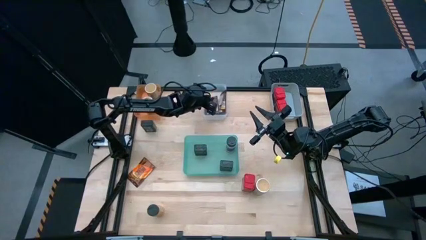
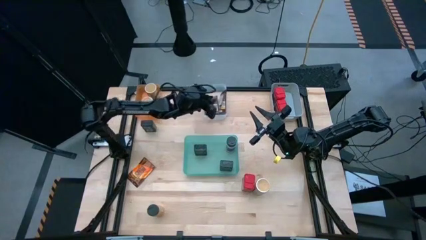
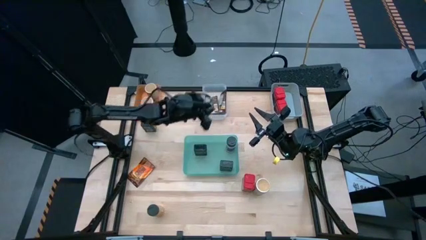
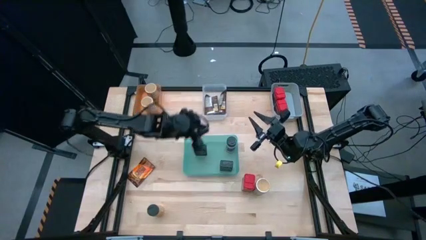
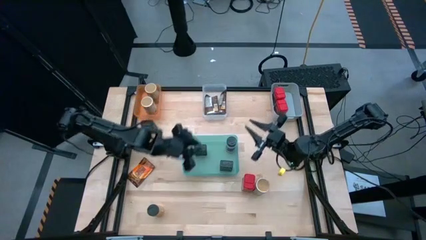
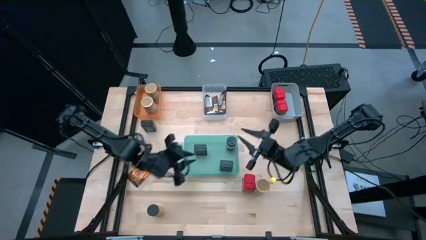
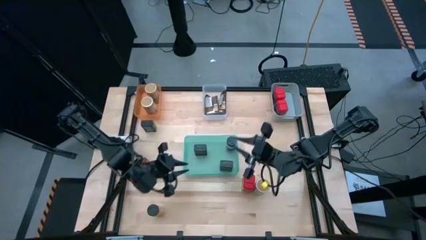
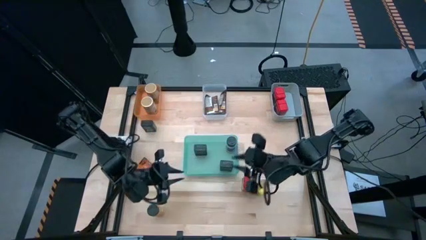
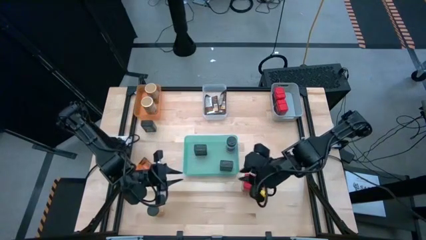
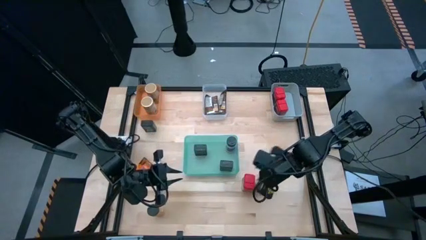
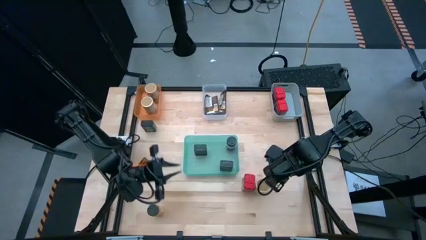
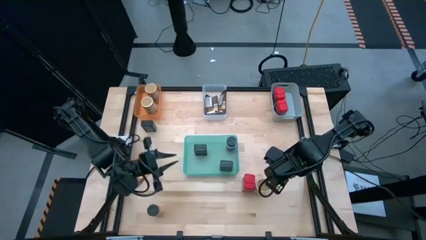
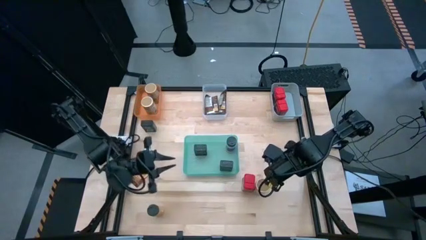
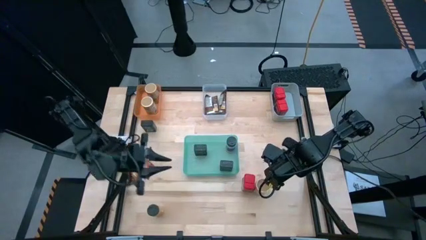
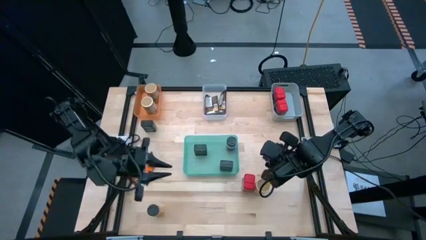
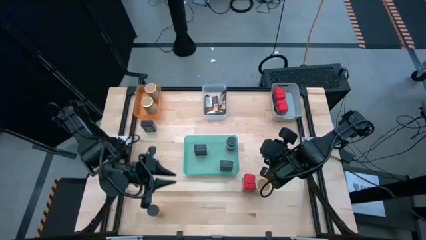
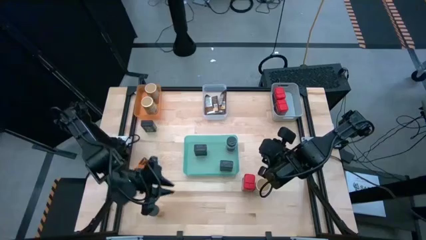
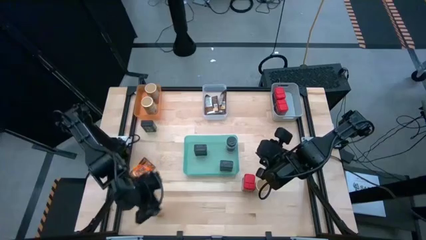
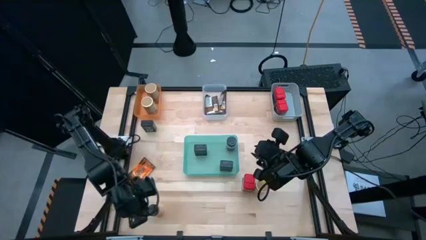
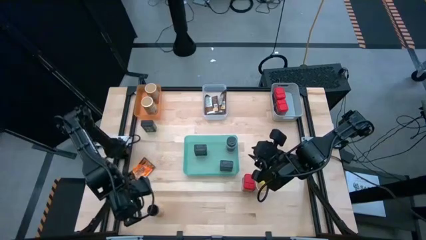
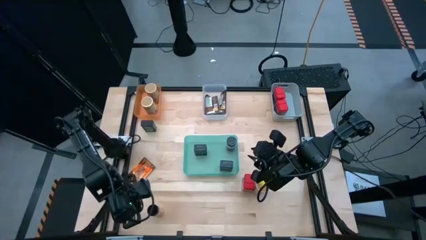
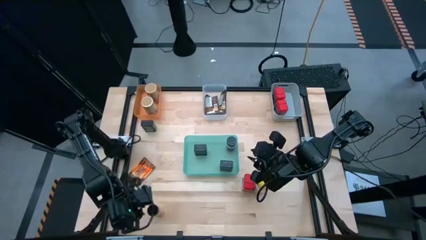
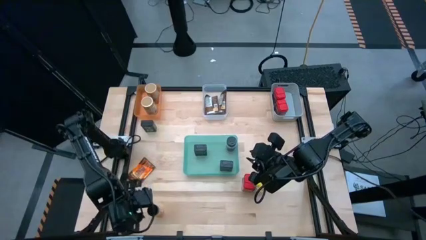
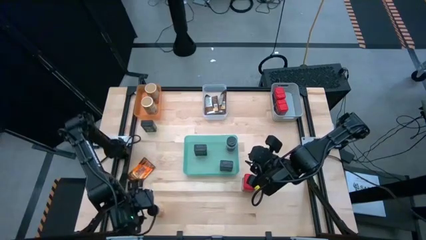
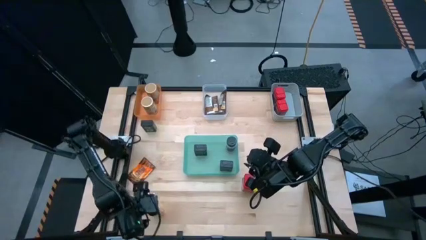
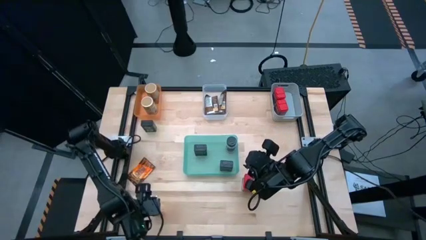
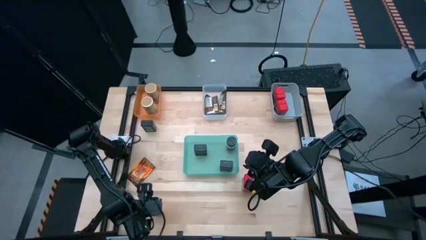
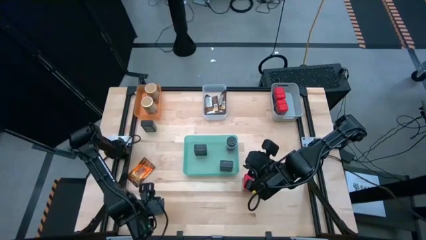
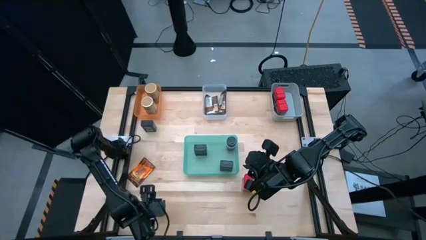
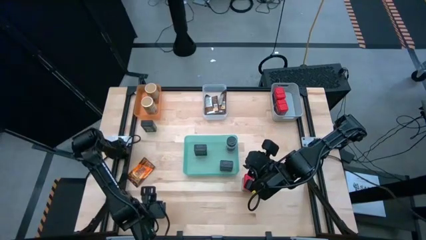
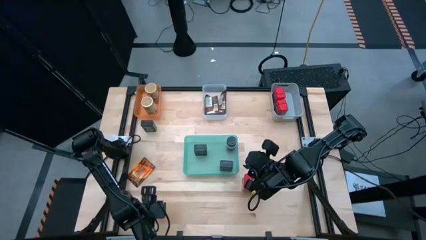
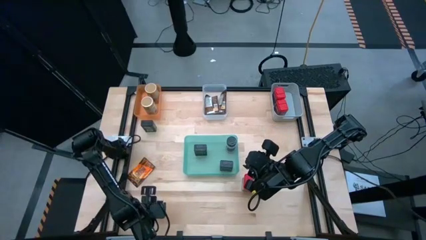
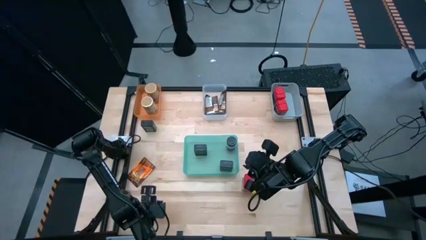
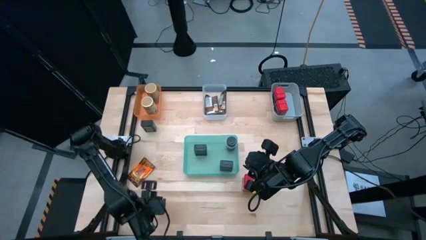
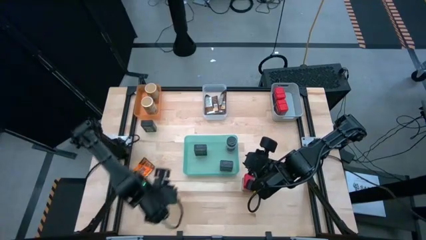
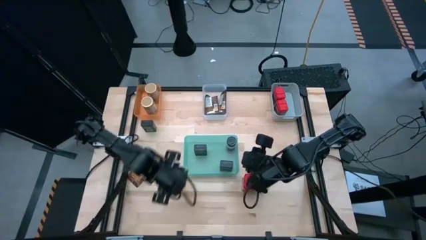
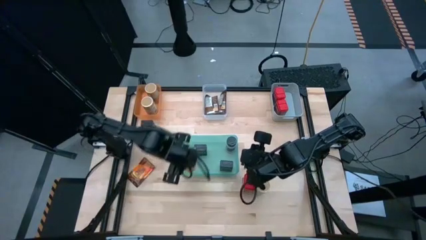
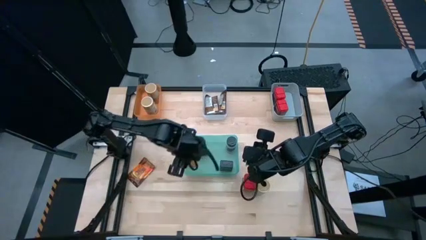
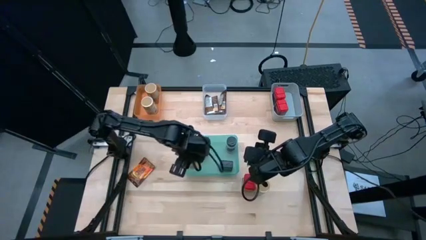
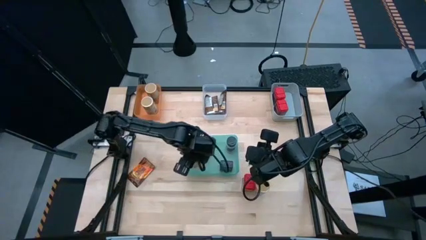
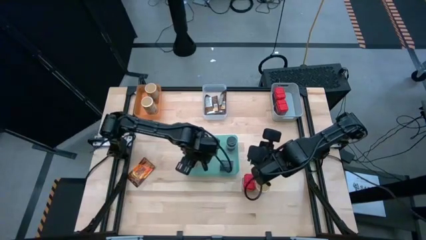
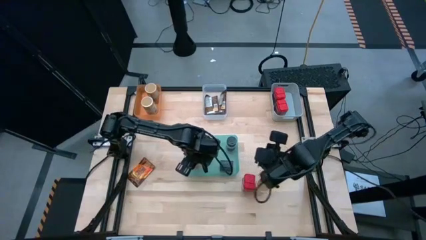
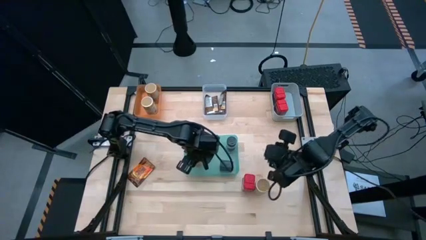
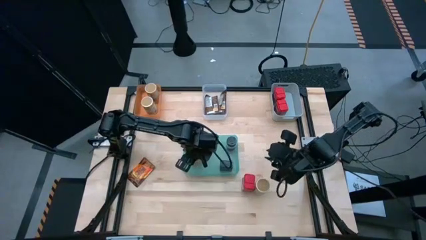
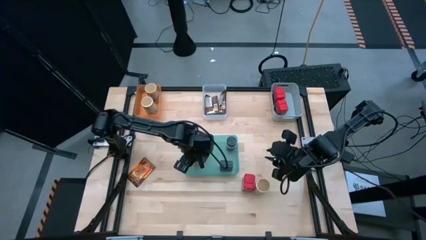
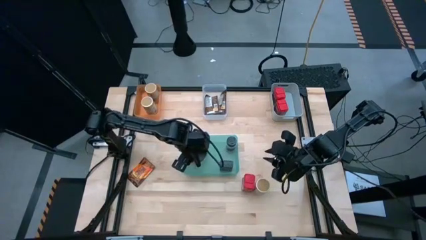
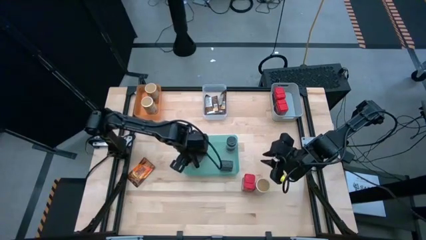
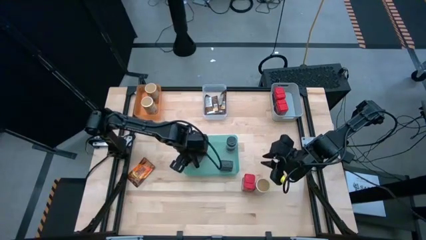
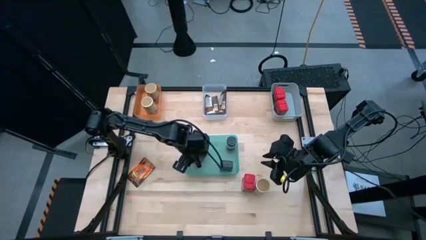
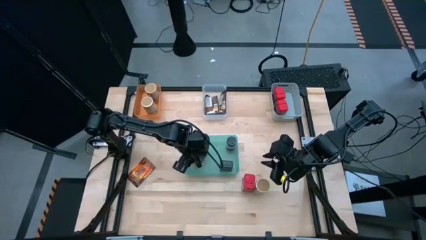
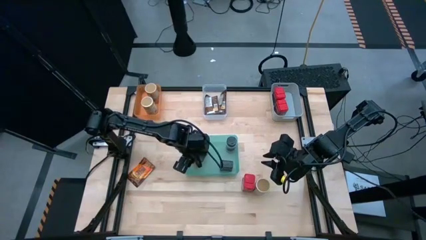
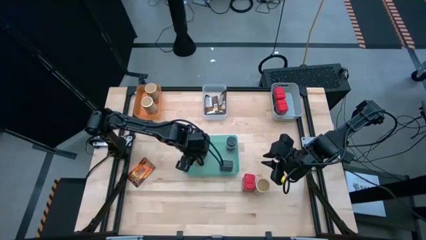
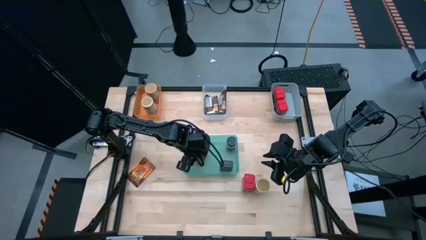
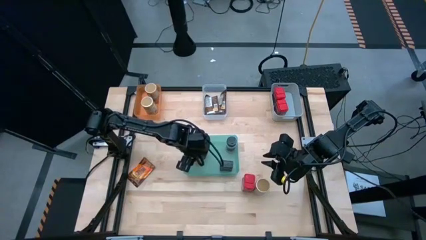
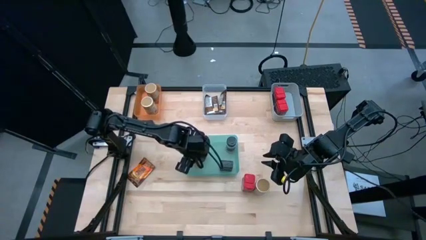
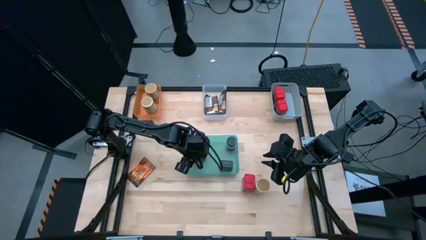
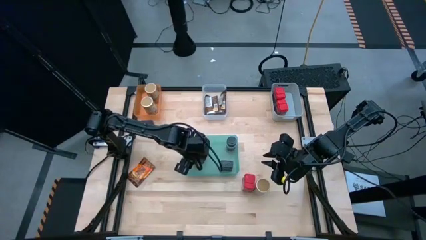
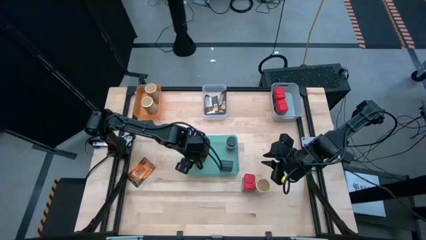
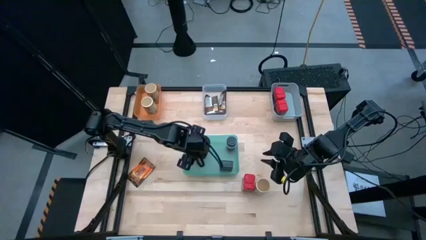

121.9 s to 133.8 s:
Task: Sort spices by type
Put the black spice bottle into the green bin

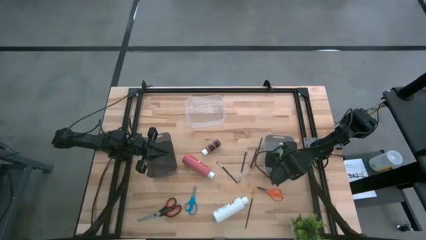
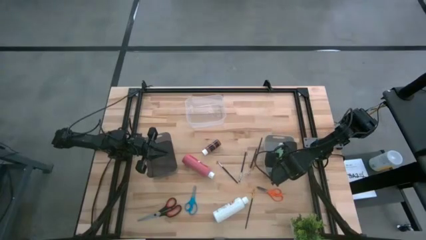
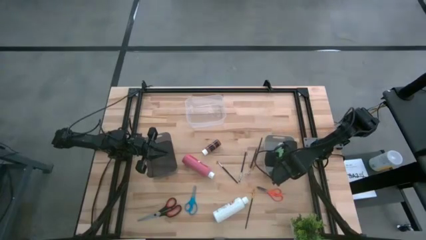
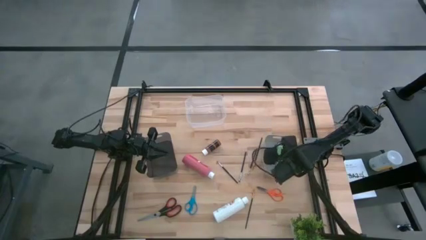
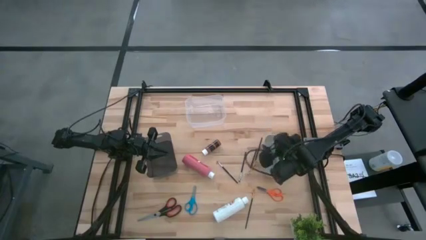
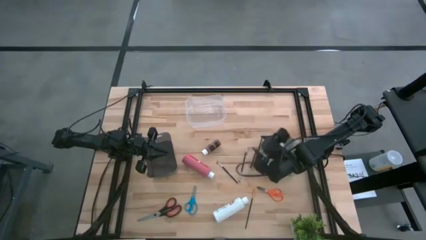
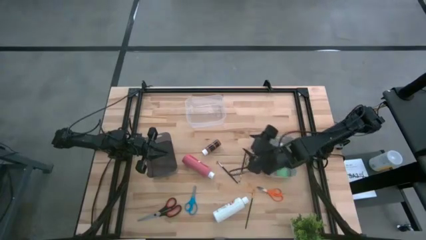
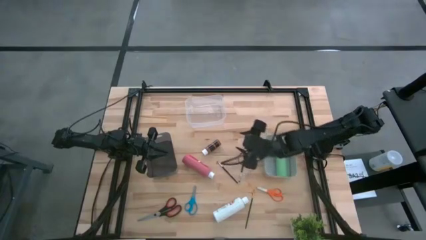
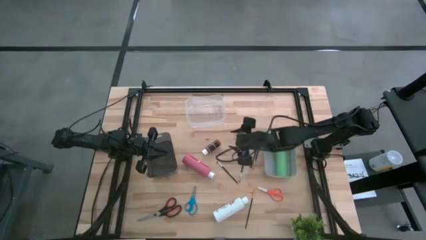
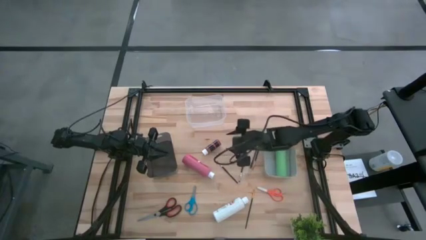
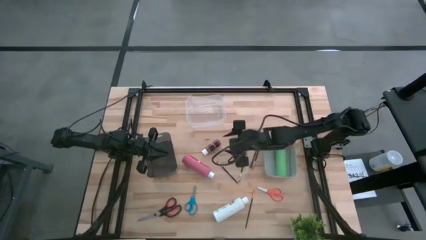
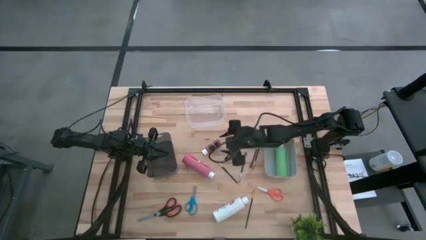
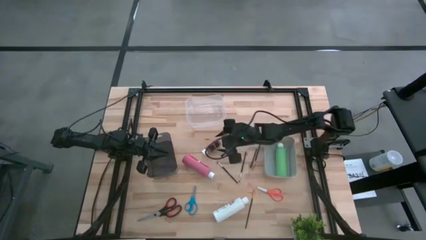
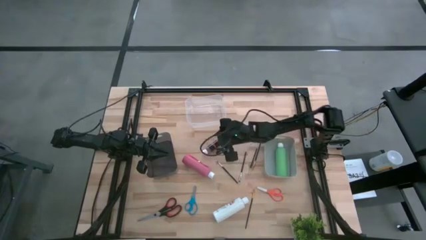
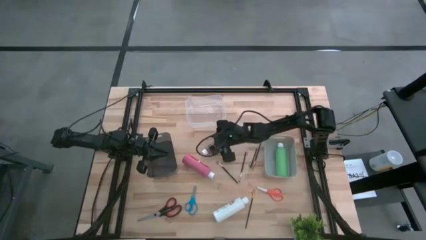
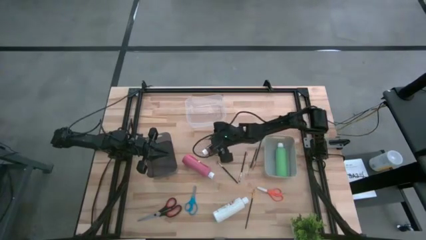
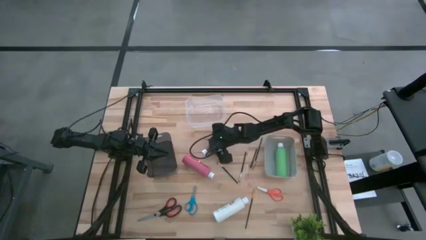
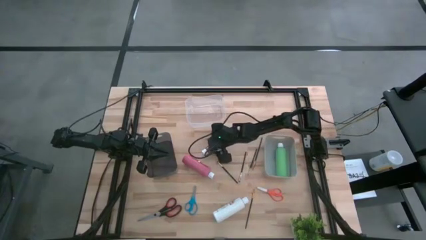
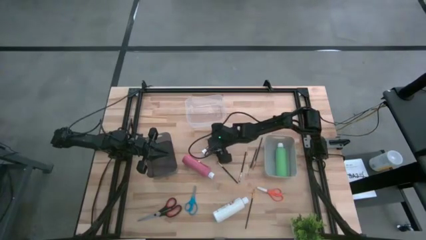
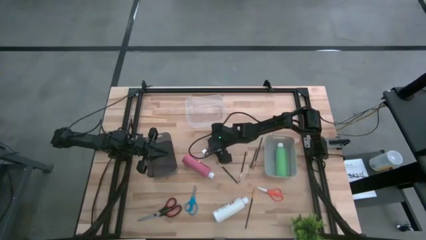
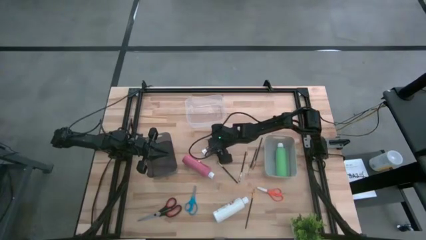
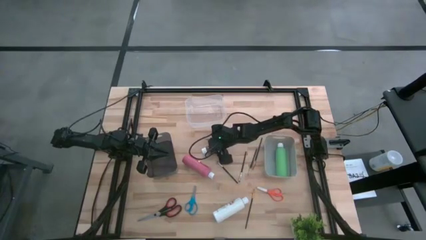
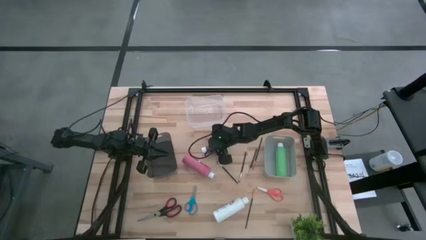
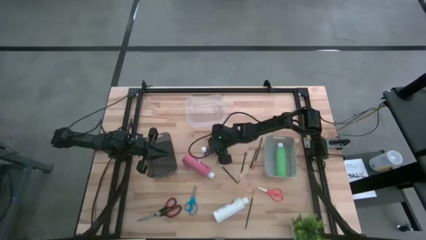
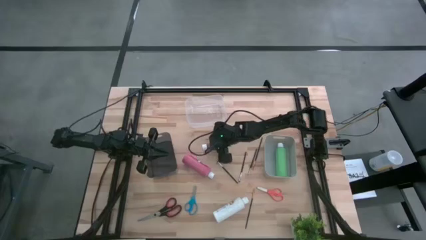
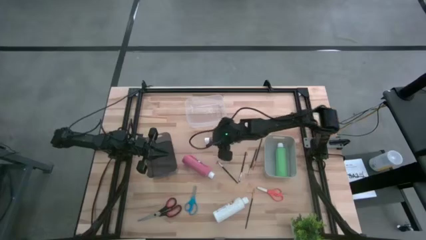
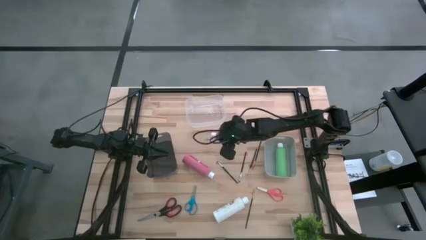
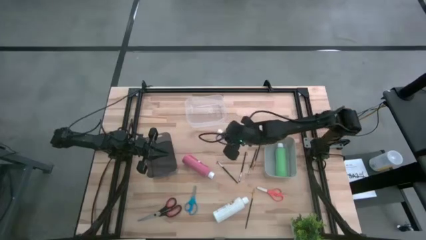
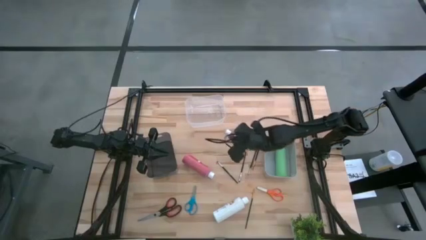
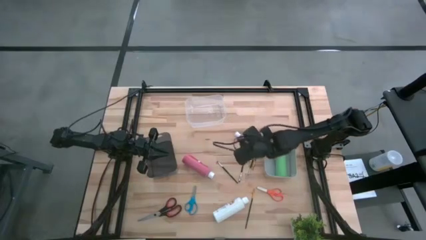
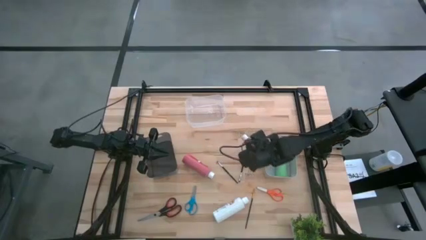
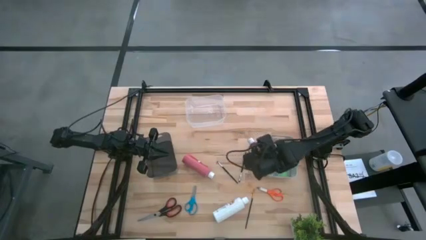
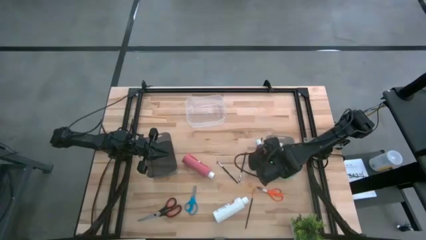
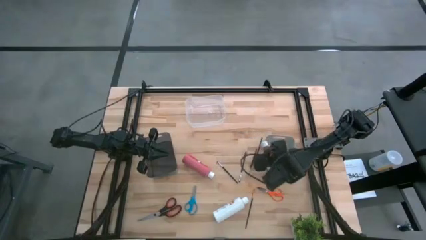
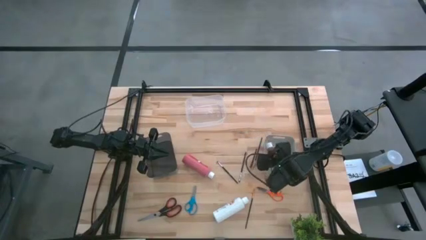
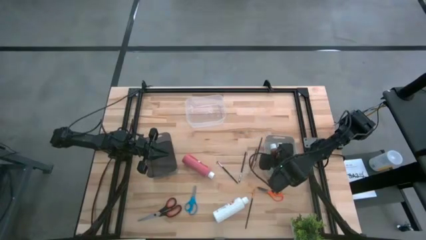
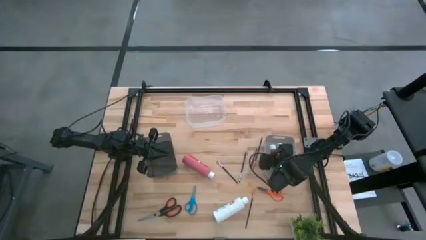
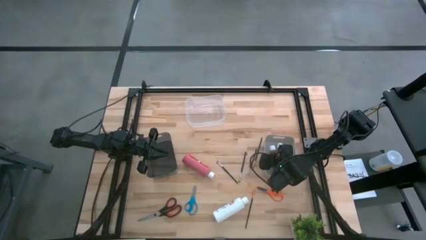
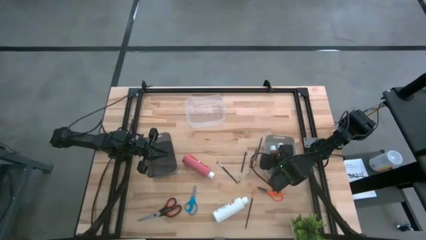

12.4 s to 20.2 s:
Task: Pick & Place Paint Supplies
Put the orange paint bottle into the gray bin
